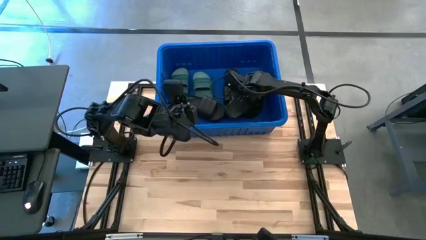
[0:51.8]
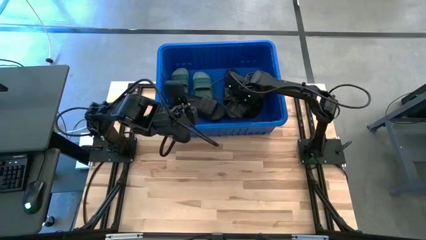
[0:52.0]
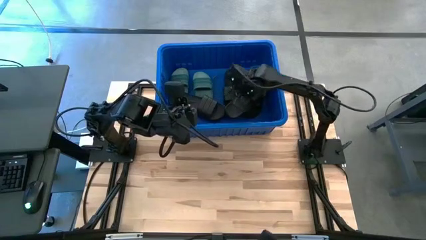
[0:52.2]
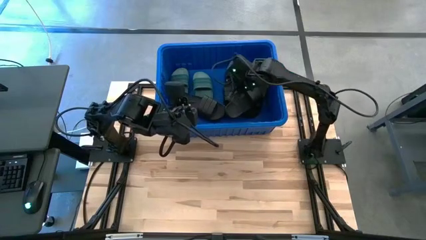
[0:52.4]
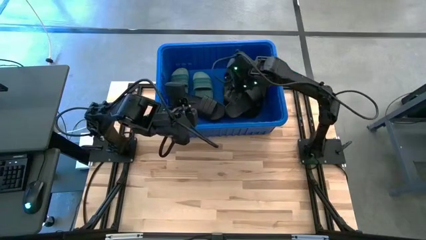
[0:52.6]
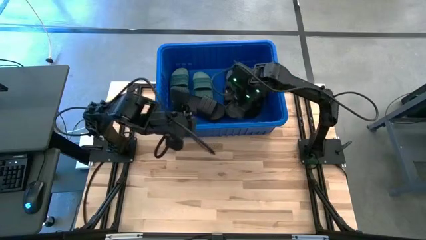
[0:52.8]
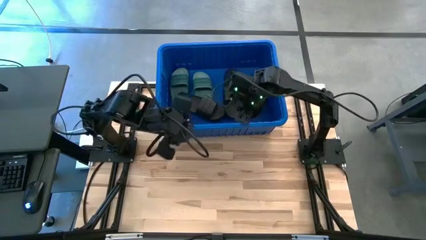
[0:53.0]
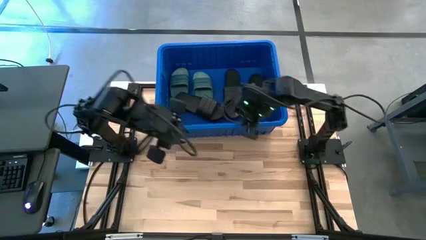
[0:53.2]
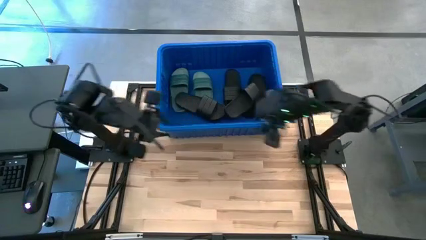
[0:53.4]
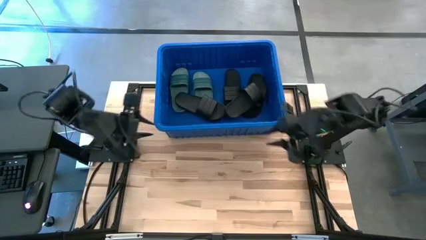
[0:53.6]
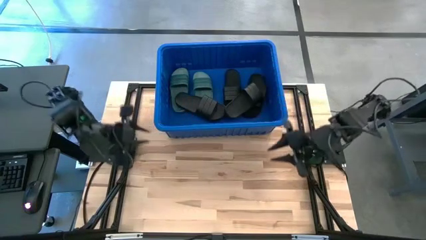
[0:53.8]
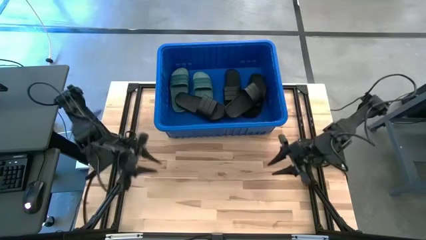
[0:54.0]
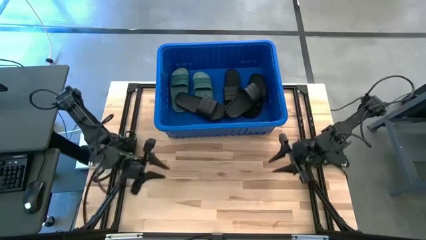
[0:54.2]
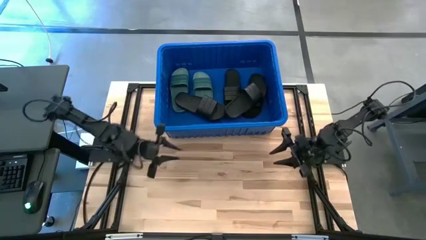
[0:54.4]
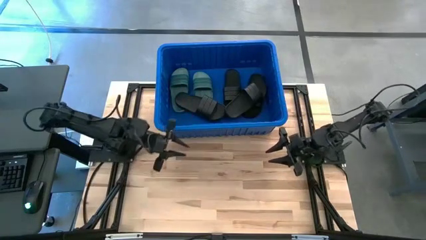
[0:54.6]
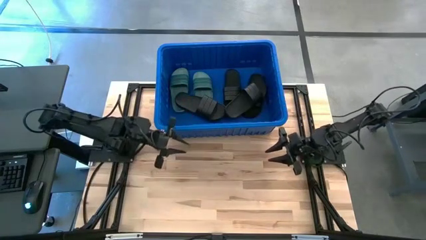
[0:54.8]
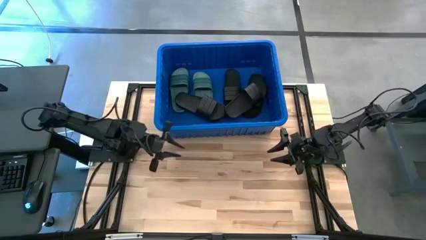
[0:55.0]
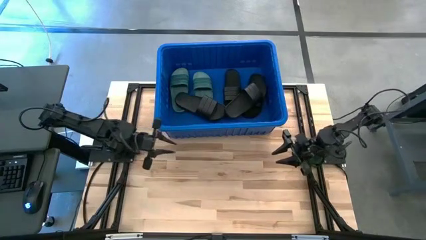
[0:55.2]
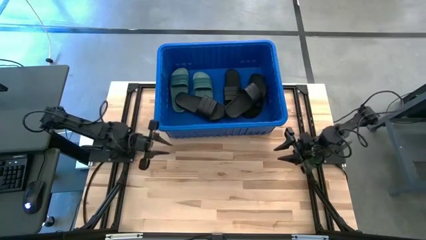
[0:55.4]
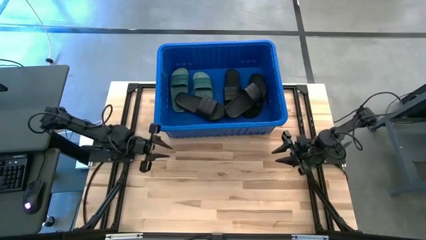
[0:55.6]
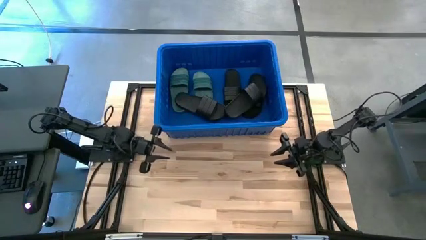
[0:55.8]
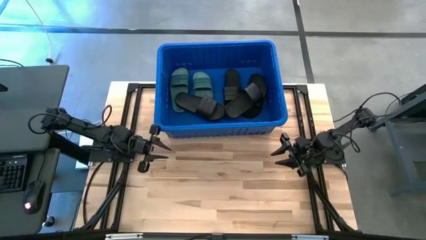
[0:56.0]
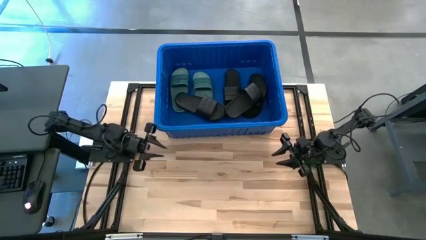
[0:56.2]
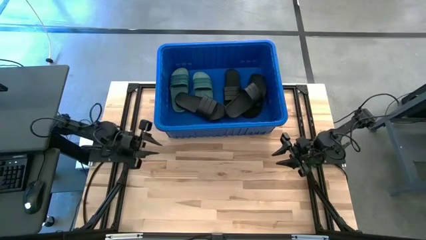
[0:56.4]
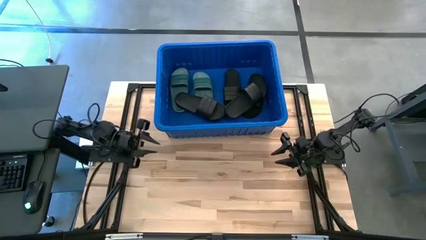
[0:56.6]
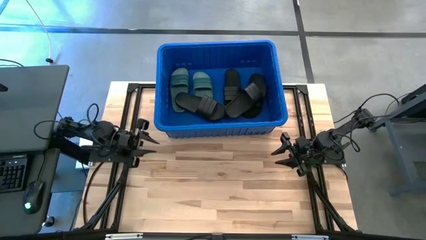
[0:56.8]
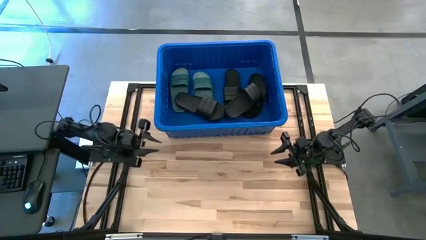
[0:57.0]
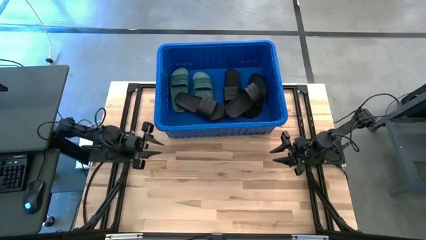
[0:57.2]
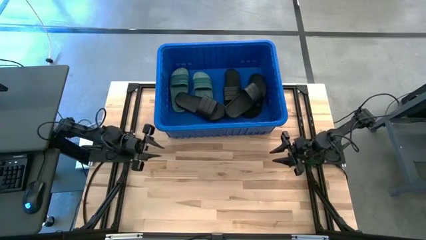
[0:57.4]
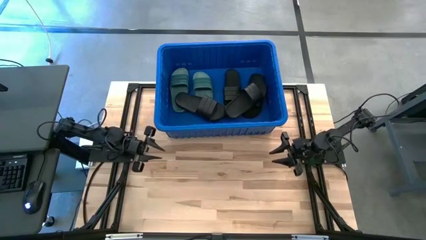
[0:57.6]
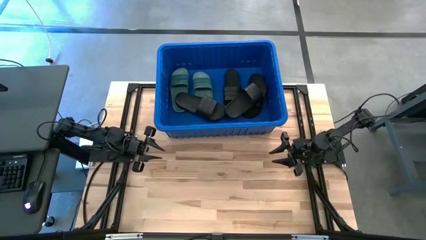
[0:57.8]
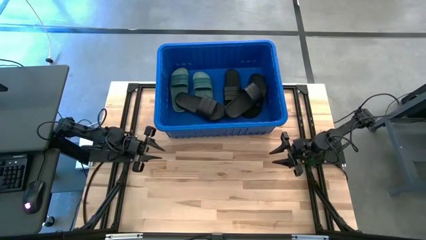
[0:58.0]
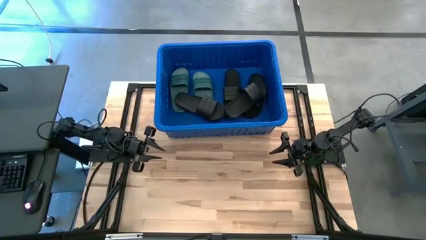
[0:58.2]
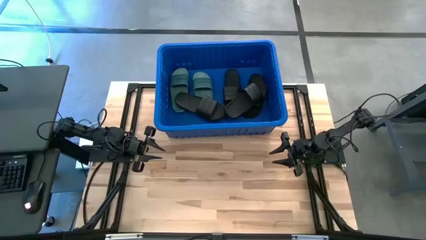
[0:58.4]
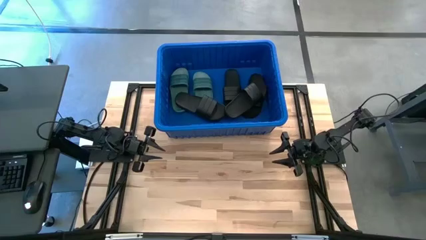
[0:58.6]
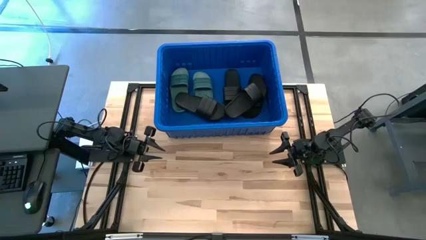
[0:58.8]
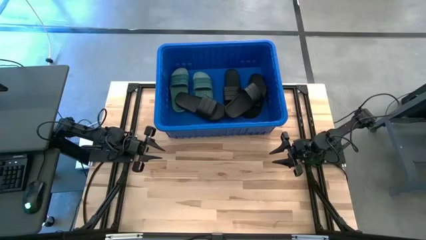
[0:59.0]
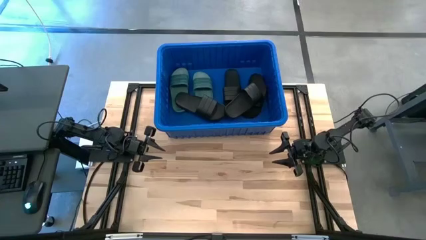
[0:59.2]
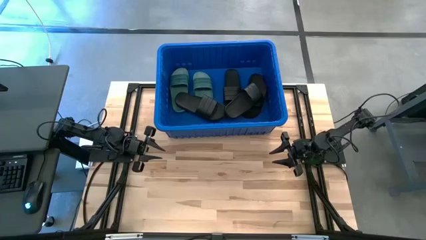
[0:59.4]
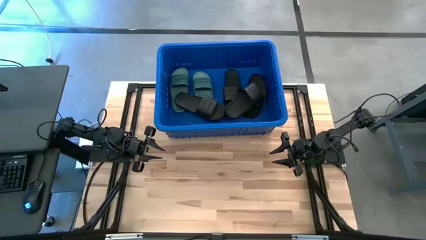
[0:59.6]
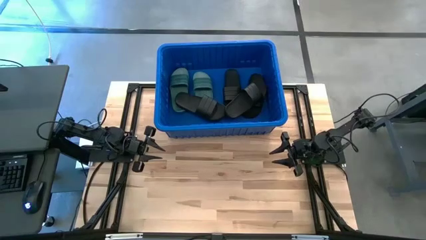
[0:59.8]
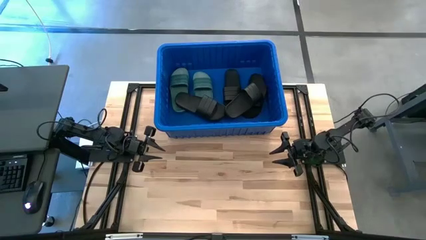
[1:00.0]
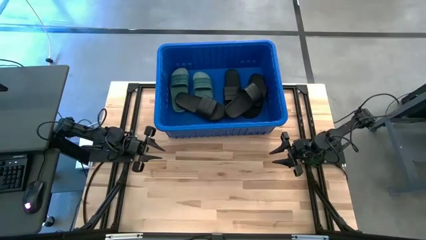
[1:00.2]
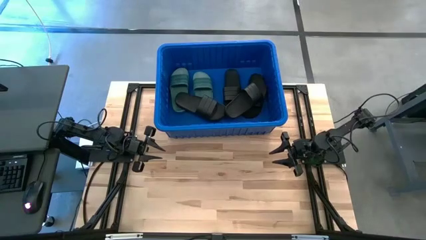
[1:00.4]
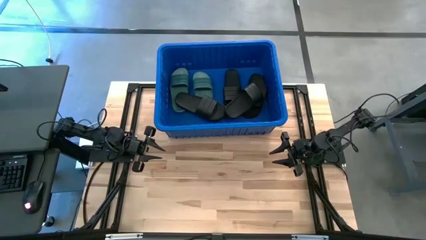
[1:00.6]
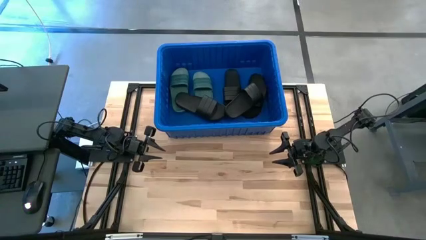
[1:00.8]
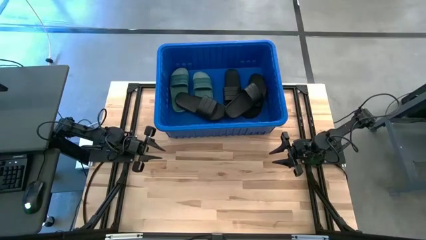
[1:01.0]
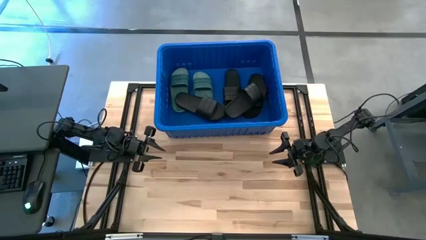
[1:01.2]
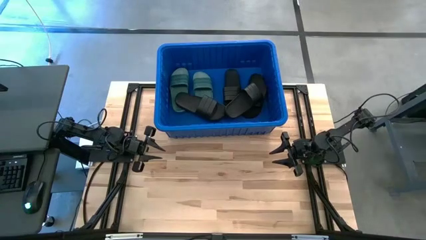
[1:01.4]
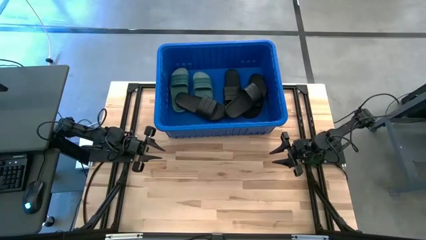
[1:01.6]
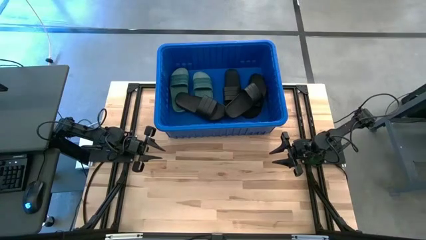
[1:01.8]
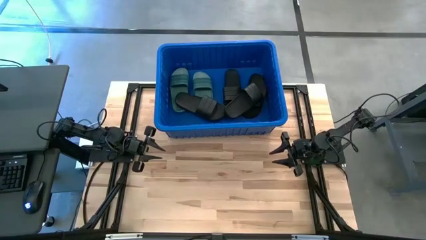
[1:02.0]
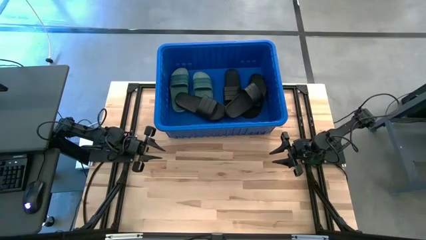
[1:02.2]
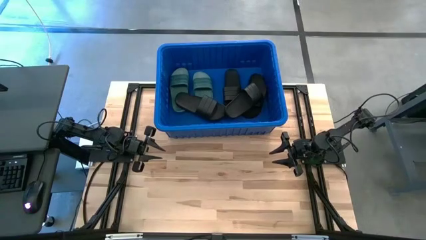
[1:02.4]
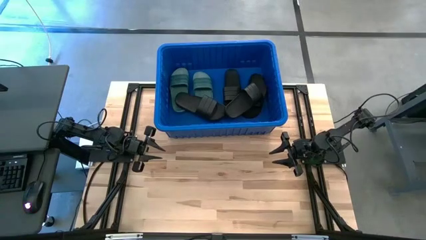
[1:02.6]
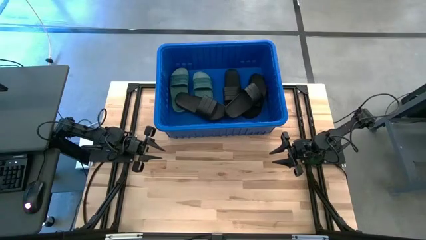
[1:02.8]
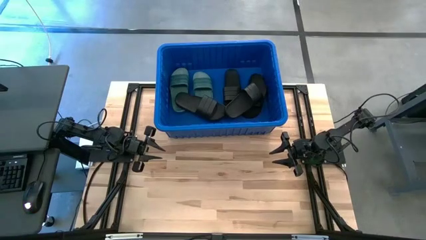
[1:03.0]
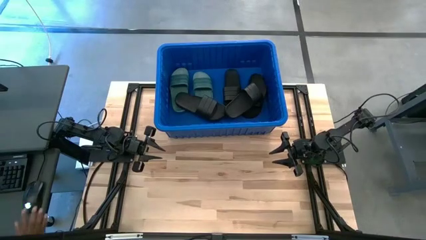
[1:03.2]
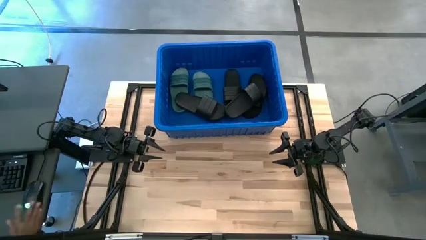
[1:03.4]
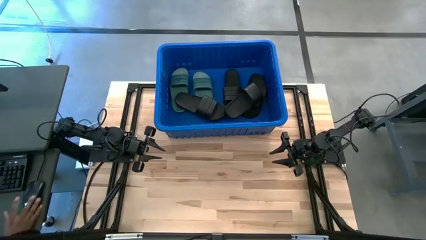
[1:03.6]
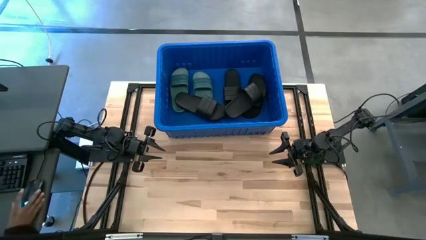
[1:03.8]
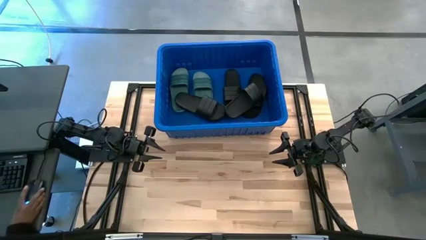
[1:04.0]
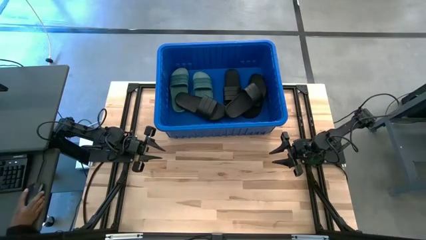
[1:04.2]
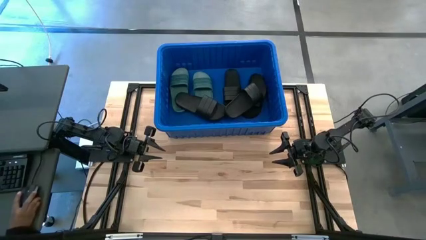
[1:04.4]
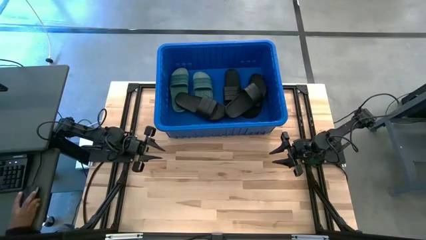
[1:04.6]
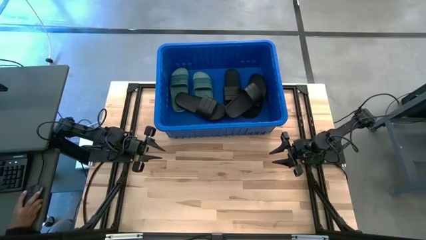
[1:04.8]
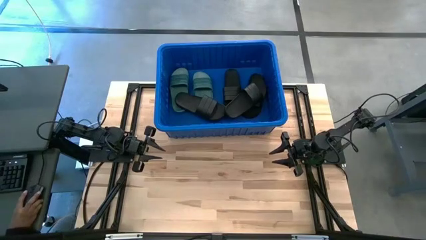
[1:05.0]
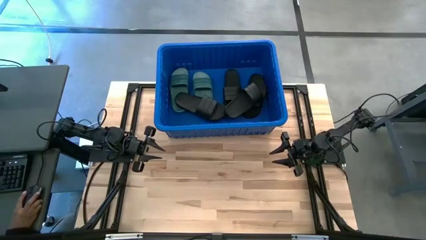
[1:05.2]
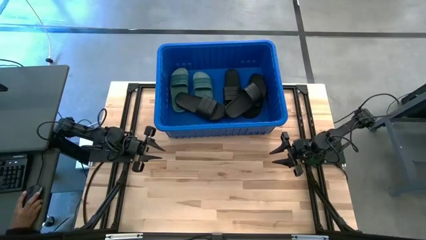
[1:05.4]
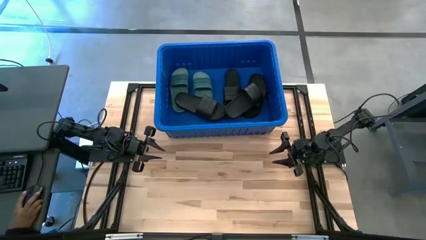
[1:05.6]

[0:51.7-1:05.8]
Task: Pick and place slides into bin
Return to Home Position

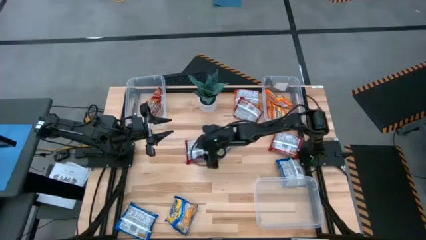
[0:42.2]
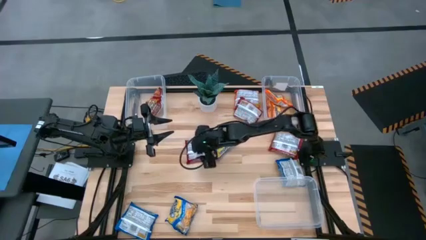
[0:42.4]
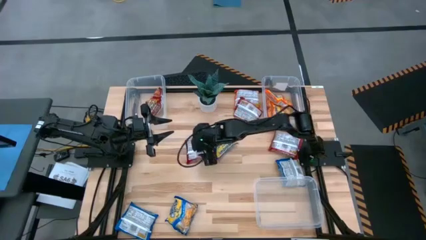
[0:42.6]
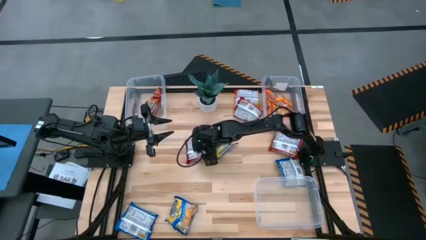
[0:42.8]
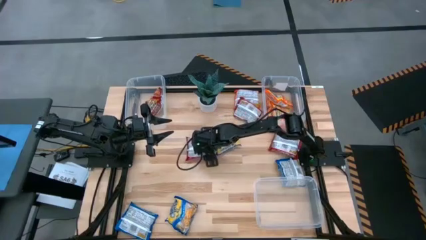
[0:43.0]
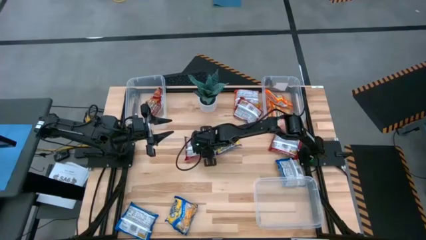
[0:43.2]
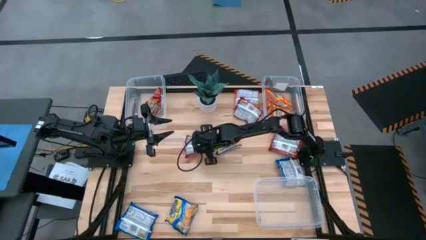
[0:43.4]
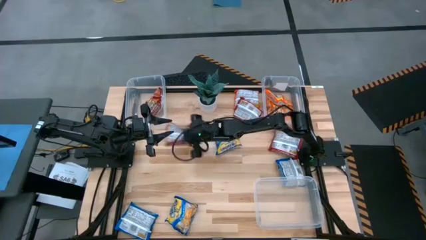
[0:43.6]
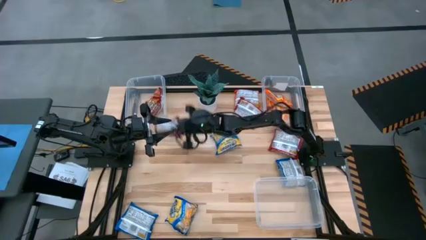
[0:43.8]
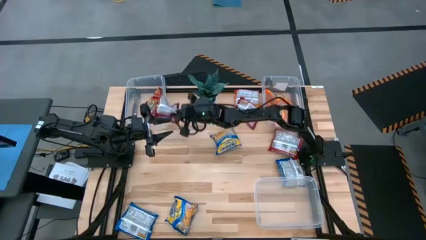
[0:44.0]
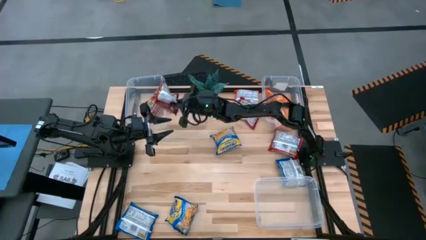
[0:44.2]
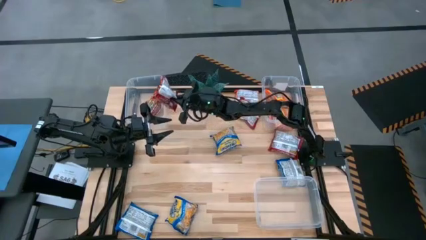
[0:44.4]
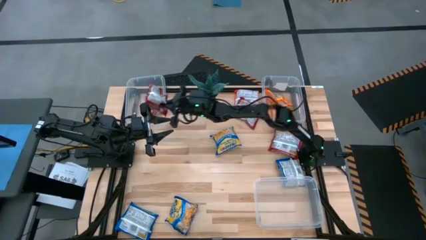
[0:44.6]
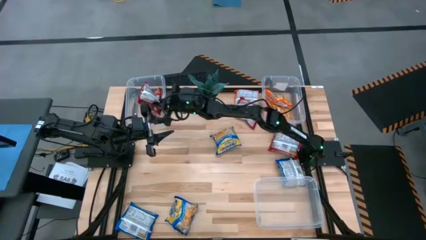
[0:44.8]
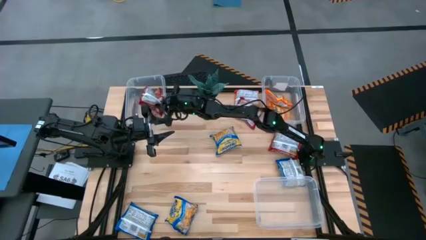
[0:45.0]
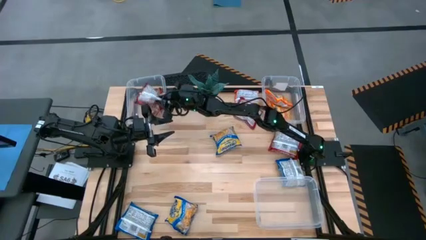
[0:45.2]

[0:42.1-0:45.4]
Task: Sort Maruchan noodles
Put the red noodle pack in the top left transparent bin
